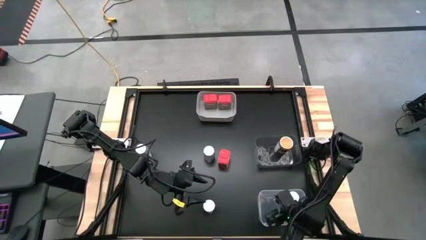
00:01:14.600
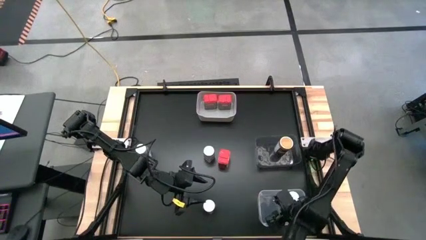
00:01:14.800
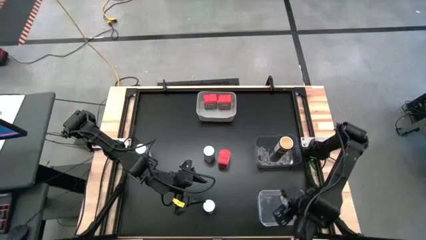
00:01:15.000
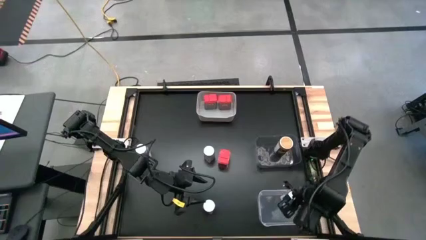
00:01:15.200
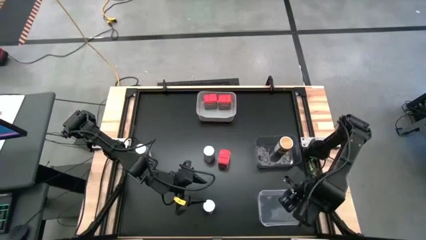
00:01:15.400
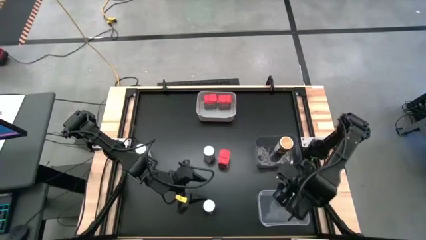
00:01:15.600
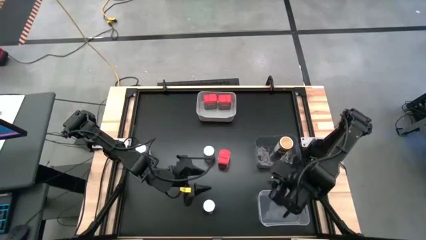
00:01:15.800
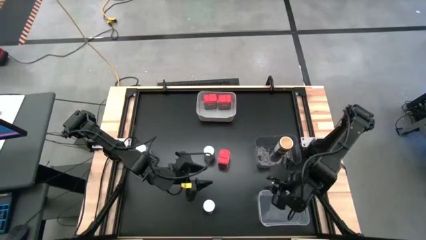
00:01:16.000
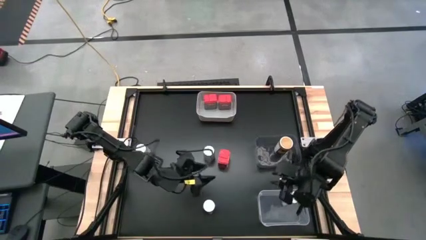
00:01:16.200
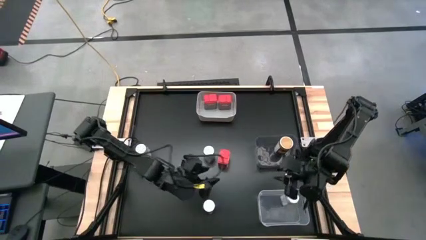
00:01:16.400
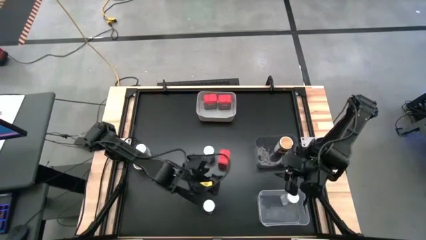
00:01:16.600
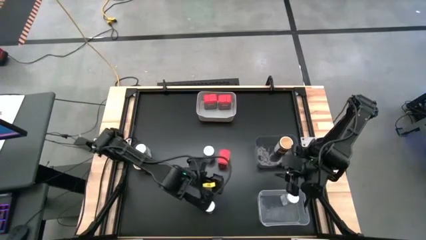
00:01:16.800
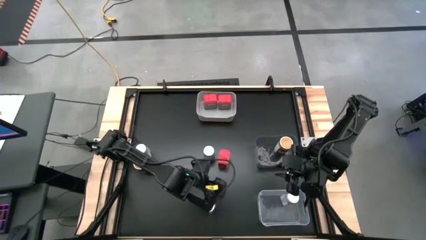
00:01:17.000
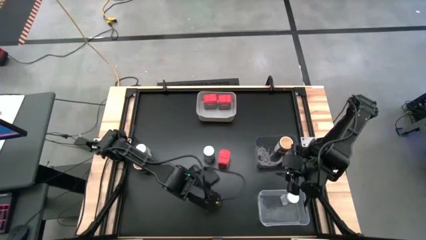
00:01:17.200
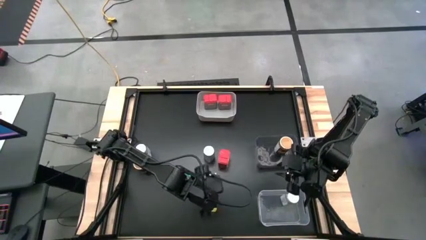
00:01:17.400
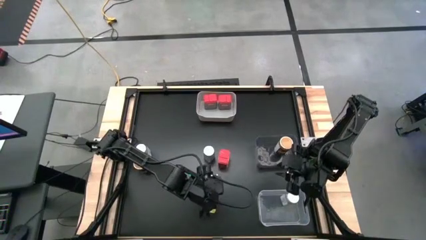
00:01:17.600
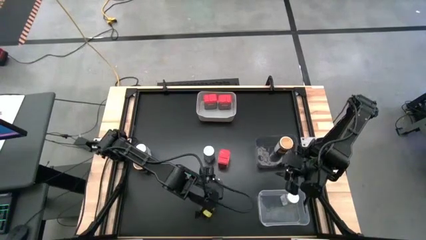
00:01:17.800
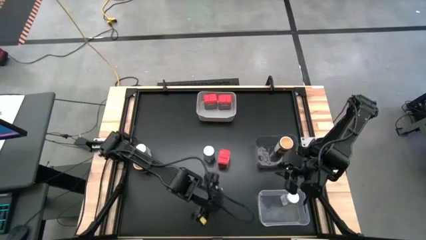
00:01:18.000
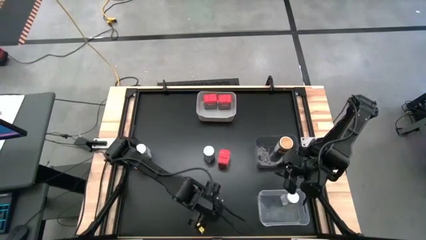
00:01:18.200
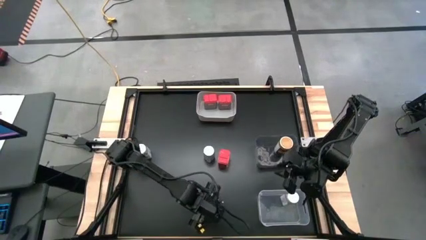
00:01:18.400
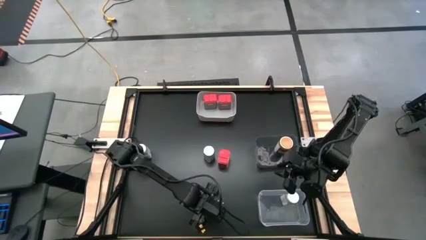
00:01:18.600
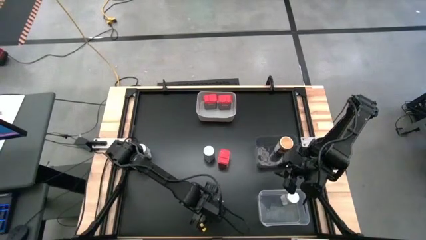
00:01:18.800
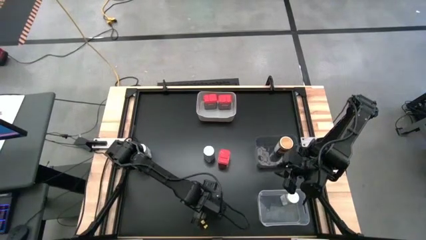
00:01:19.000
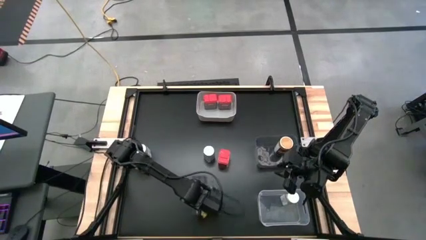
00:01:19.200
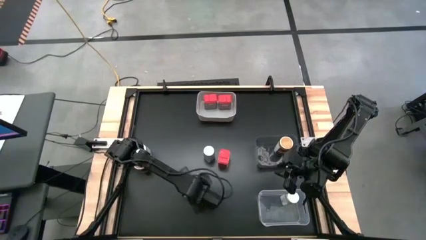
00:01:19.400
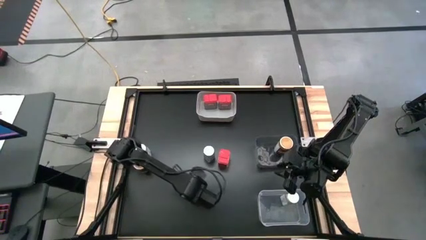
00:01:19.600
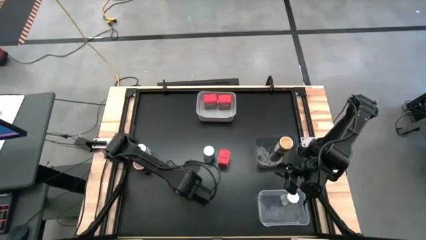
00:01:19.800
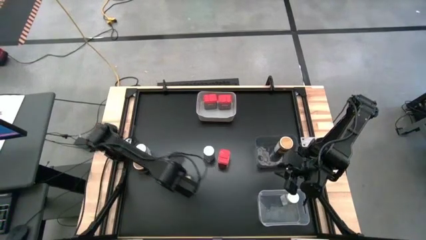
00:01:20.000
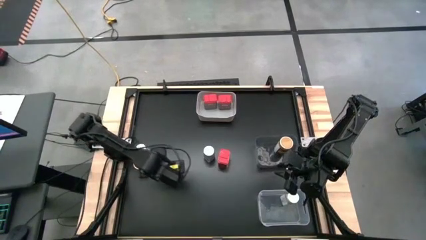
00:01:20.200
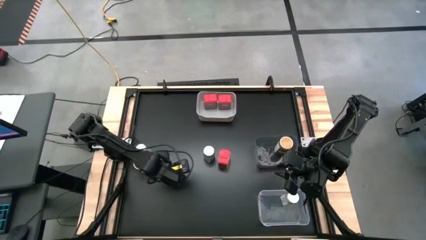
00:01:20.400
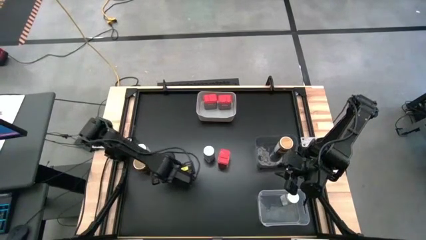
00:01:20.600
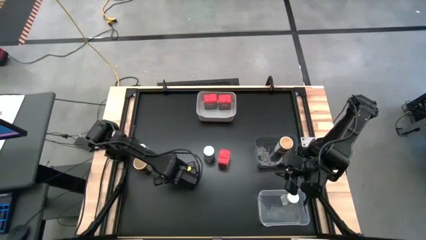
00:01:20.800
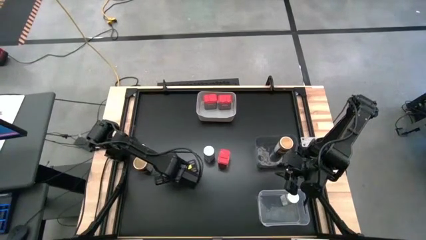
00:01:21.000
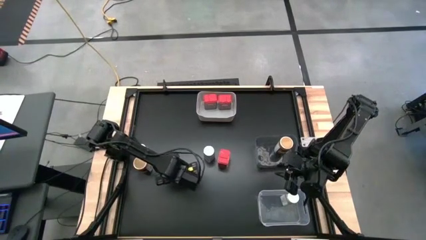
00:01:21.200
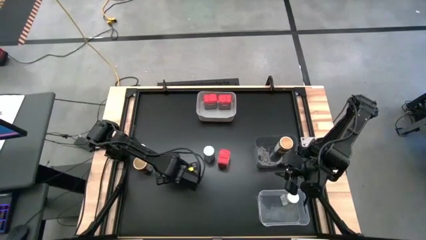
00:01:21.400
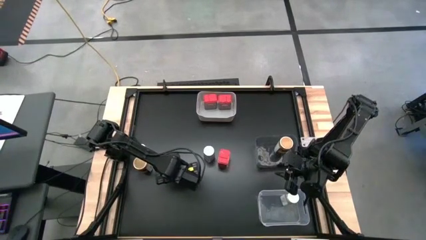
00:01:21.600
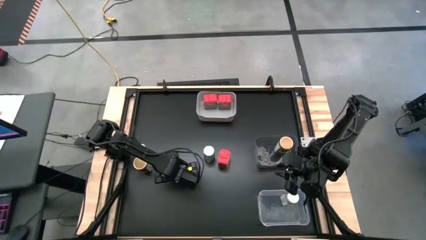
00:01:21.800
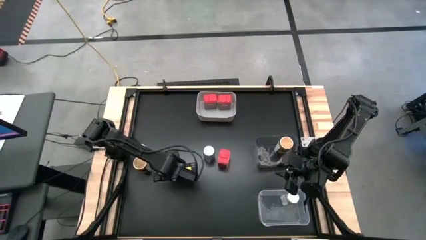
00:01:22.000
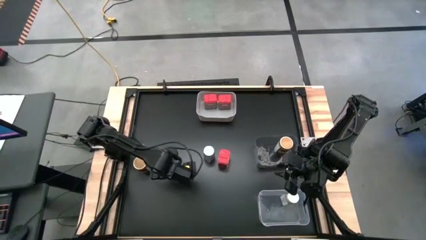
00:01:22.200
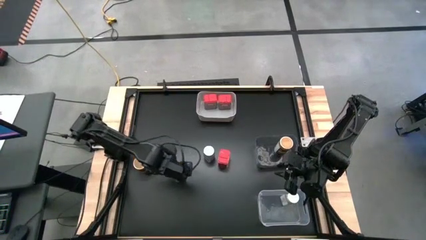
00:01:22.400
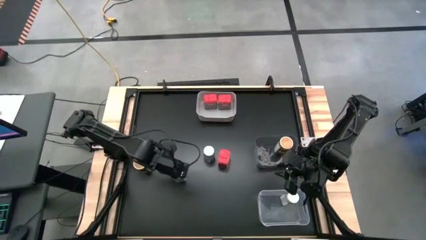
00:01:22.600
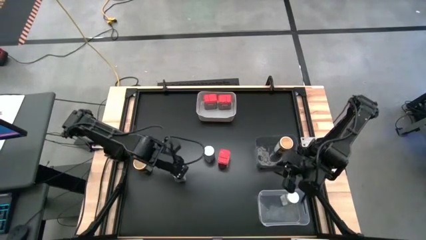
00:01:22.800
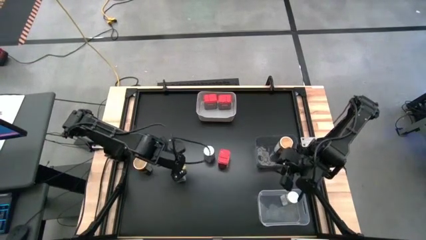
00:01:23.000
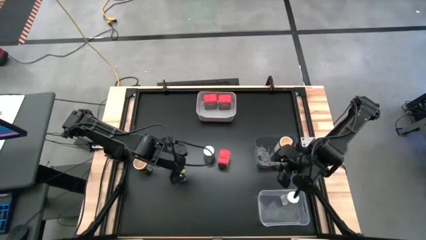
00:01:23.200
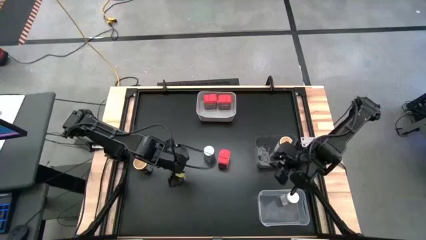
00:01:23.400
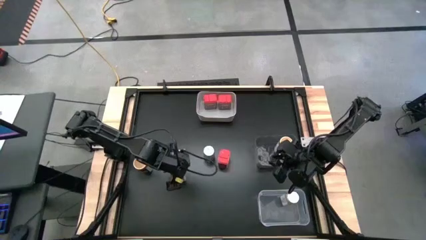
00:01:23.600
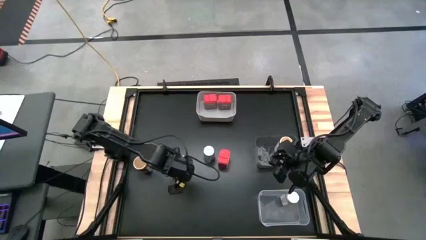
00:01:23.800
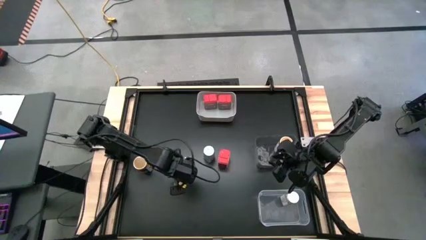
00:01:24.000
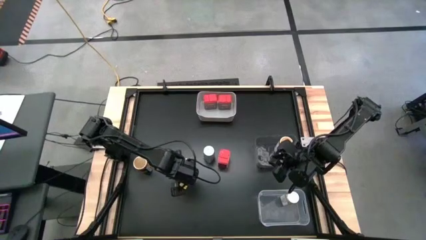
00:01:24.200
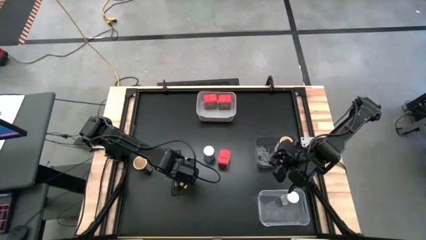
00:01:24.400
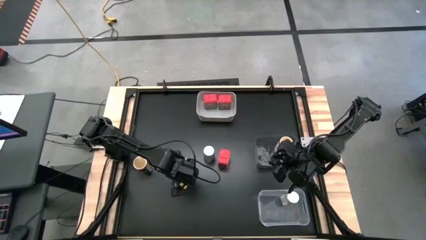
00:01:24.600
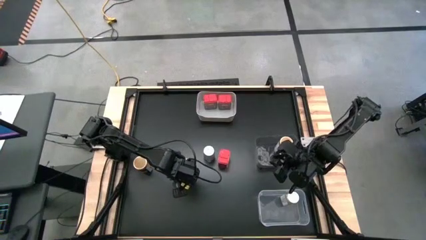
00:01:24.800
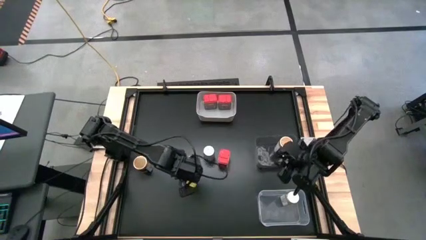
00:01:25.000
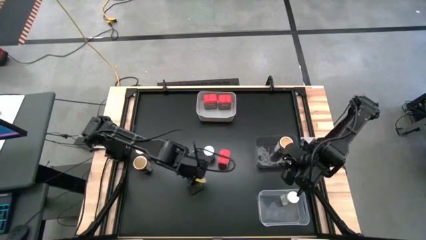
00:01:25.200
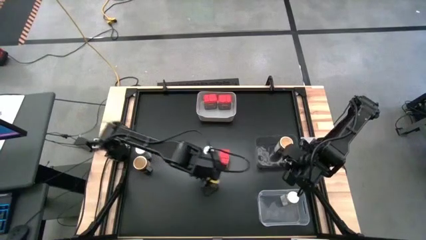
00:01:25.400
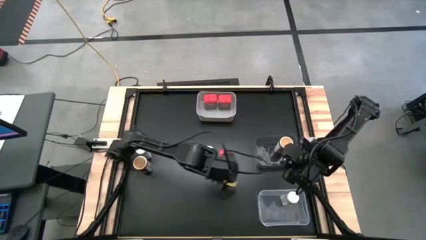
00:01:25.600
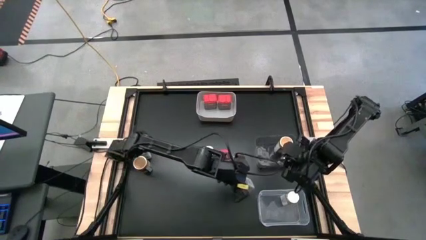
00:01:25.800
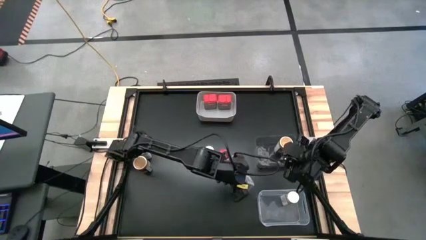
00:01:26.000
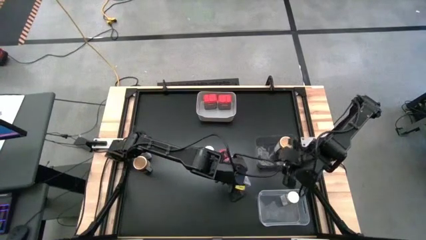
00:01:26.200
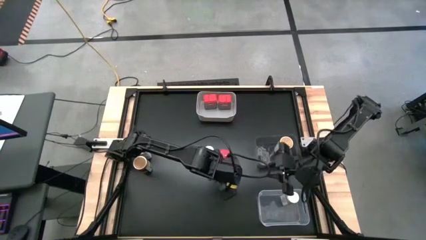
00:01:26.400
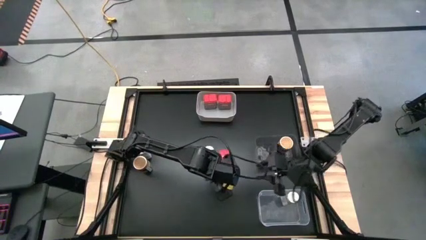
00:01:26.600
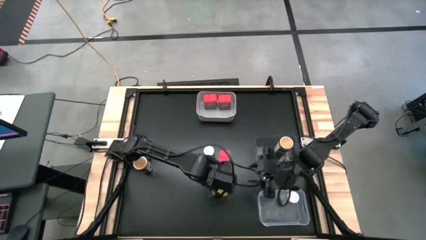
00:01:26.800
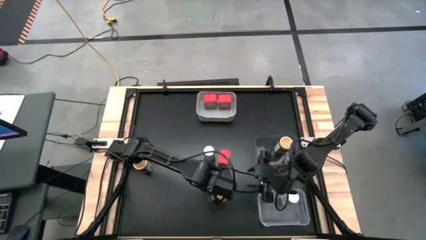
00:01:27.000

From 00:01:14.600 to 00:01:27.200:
Task: Sort spices by type
Put the bottom right white seasoning bottle into the transparent bin

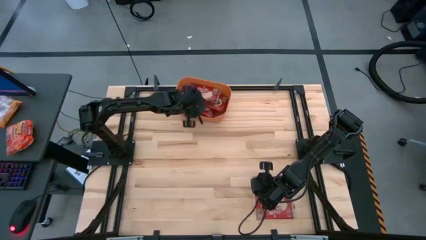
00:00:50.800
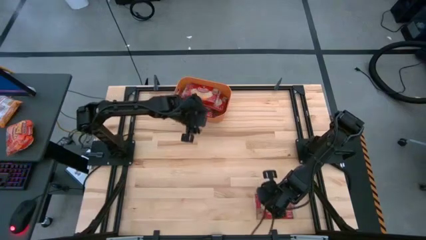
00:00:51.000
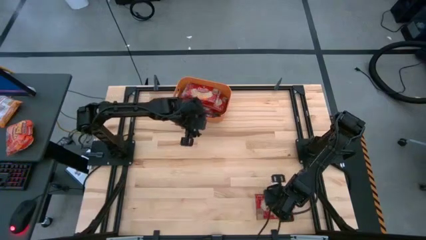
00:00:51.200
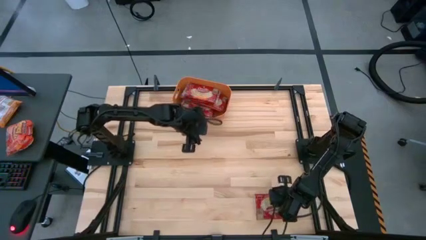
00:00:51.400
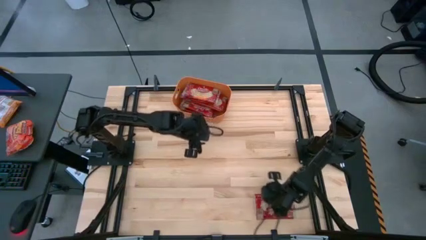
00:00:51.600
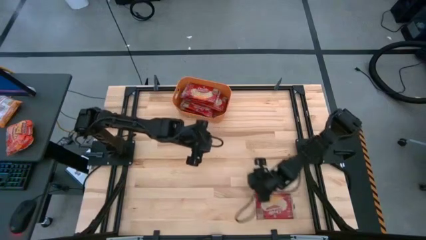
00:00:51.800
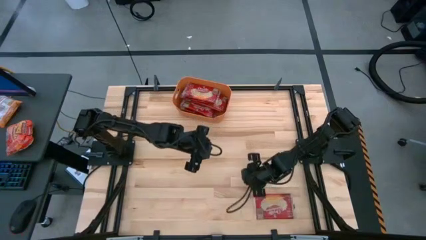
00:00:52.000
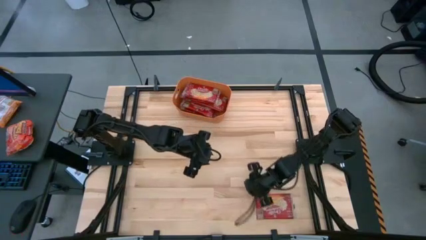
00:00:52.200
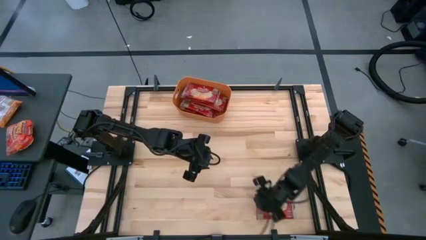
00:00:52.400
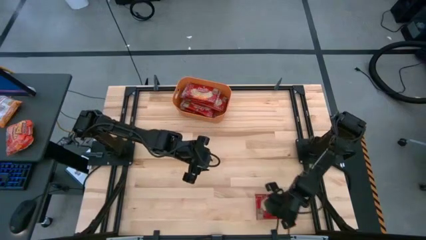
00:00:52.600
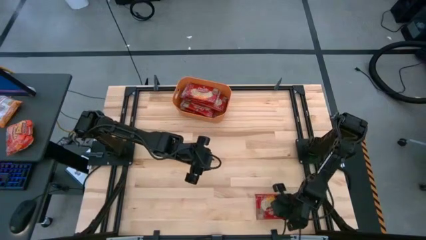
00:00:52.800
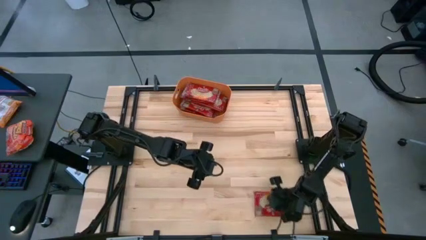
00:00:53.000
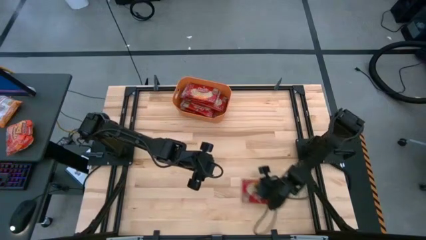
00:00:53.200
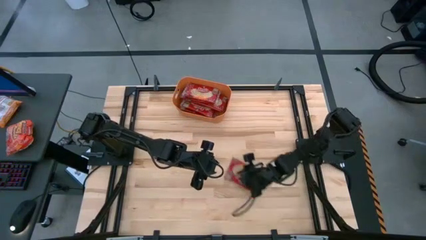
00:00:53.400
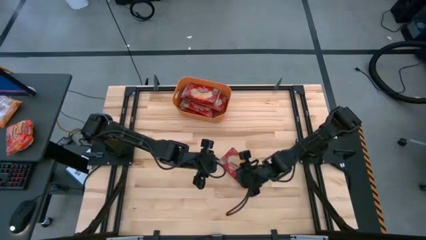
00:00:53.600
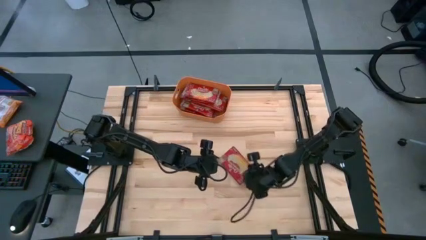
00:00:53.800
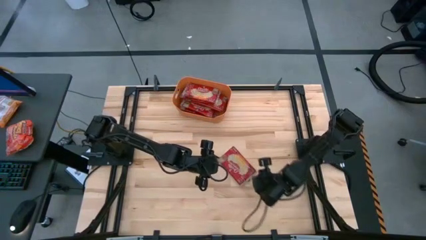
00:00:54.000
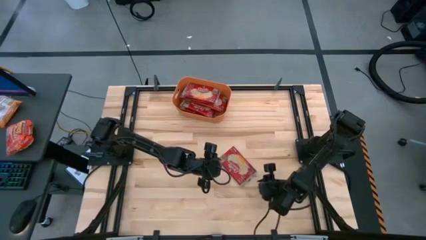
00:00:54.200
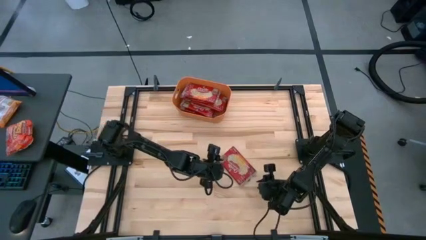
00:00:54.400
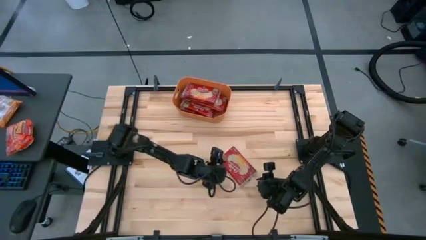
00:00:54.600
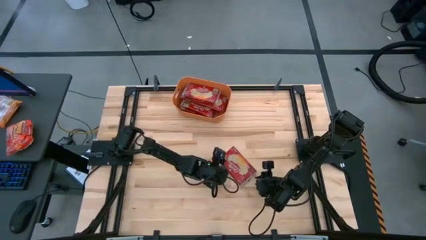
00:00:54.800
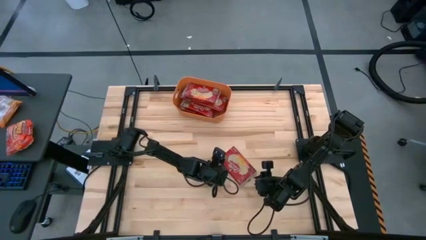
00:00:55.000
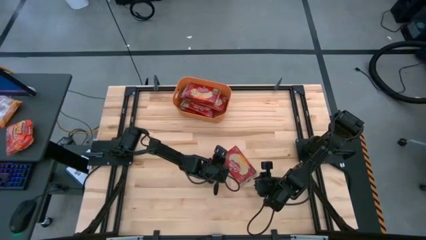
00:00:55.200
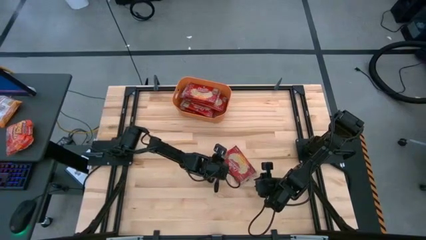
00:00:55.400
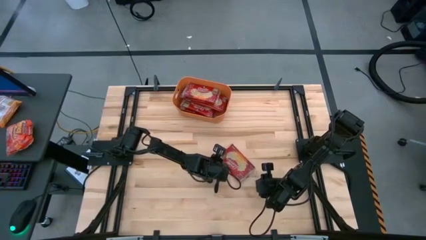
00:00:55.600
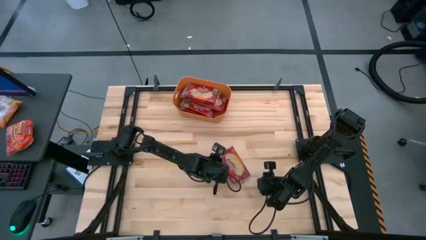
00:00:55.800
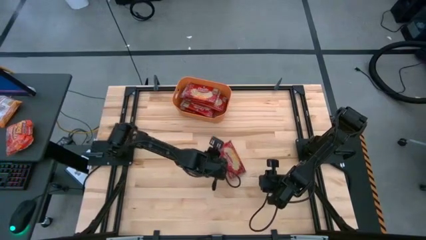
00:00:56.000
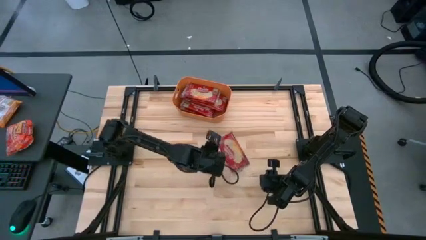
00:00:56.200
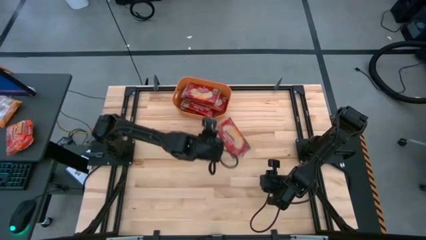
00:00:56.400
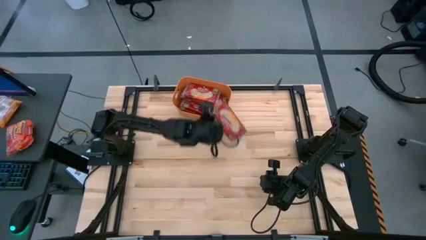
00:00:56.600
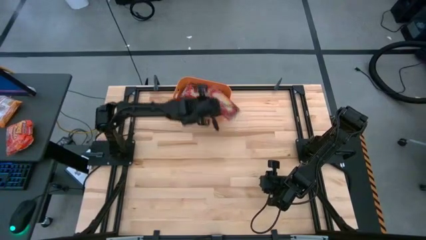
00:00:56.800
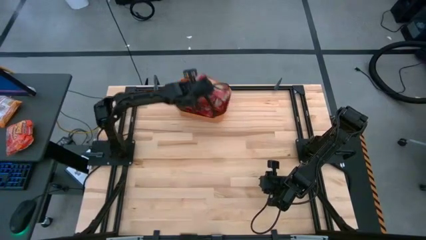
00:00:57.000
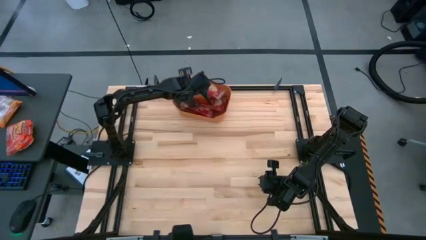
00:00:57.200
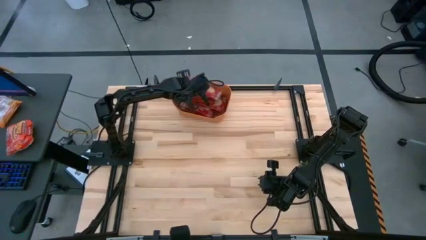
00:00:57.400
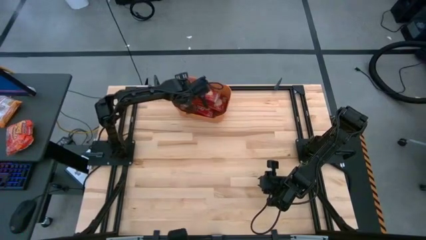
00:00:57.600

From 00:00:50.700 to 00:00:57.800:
Task: Sort popcorn bags into baskets
Put the red popcorn bag into the orange bin
